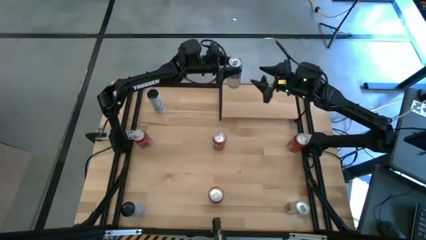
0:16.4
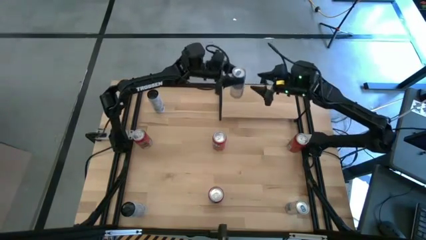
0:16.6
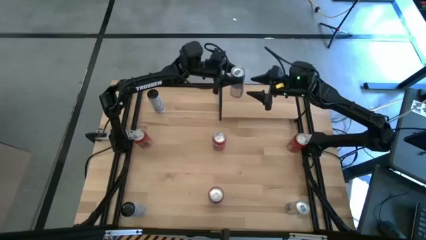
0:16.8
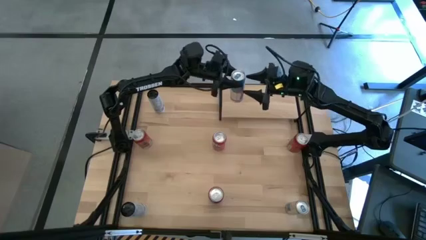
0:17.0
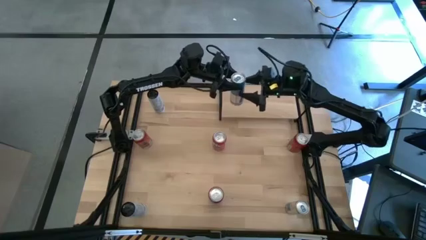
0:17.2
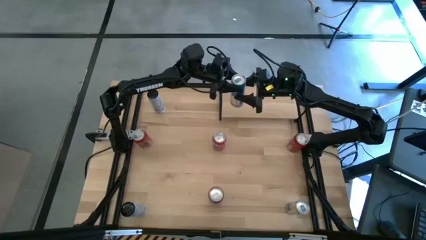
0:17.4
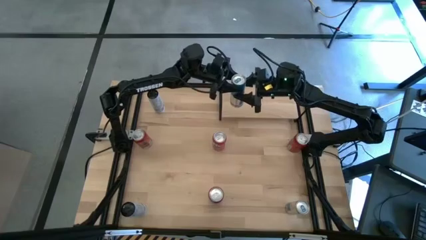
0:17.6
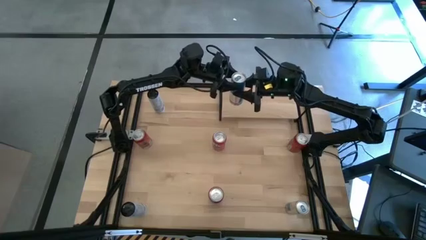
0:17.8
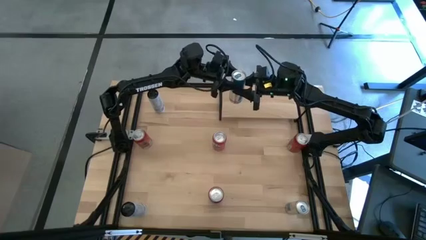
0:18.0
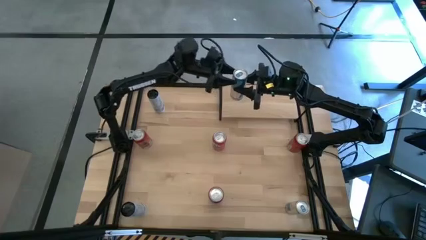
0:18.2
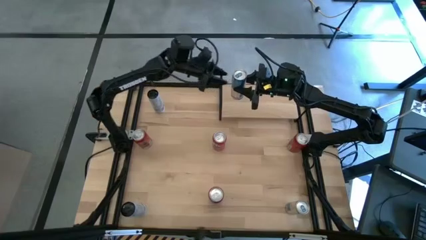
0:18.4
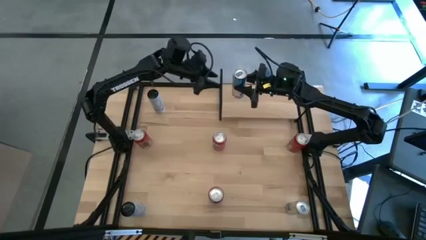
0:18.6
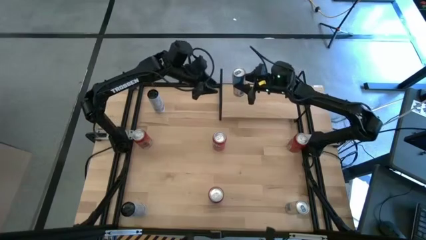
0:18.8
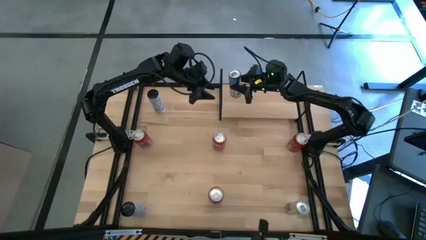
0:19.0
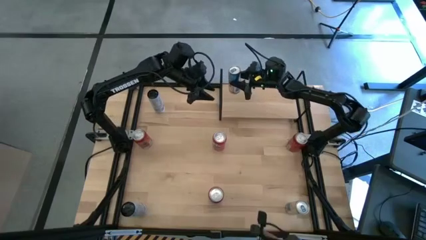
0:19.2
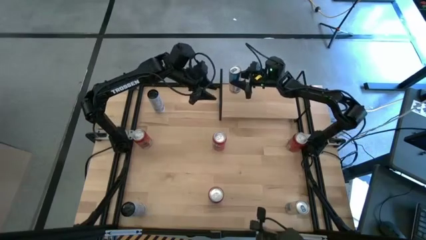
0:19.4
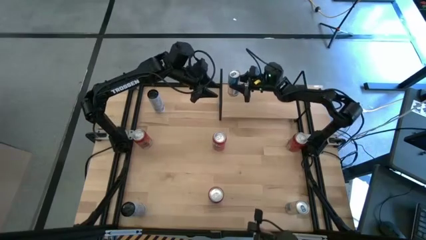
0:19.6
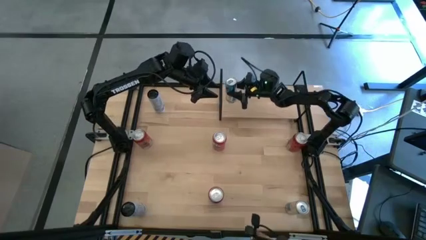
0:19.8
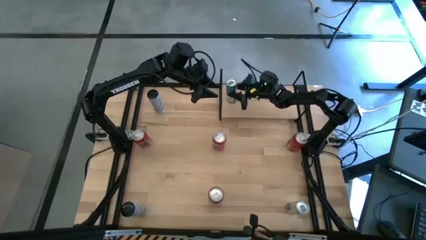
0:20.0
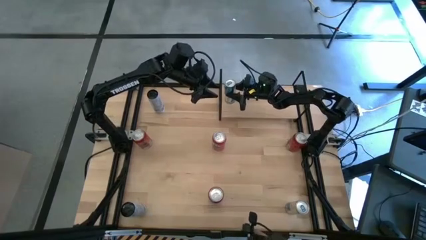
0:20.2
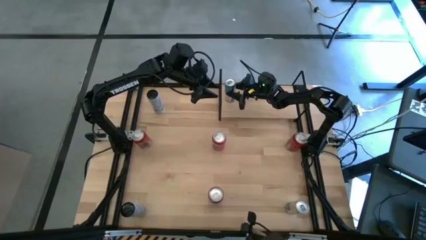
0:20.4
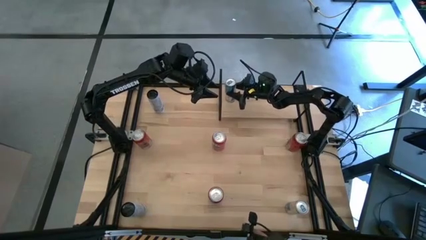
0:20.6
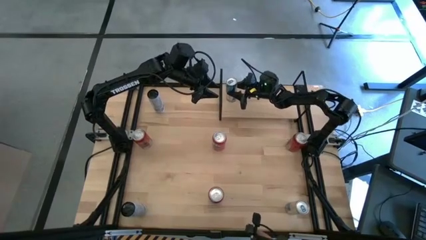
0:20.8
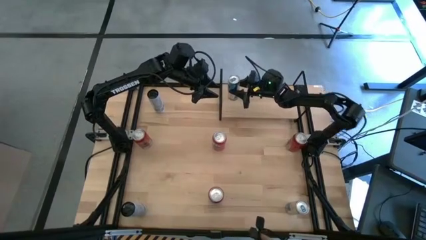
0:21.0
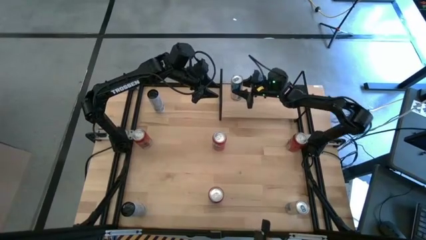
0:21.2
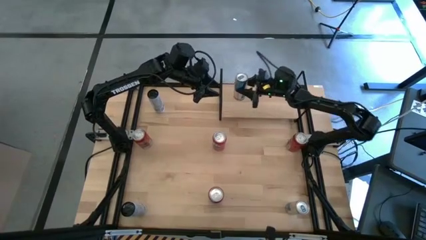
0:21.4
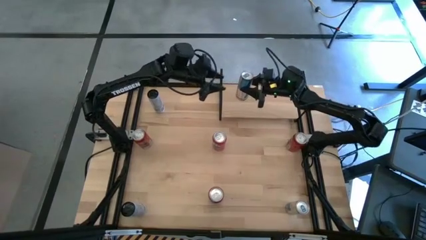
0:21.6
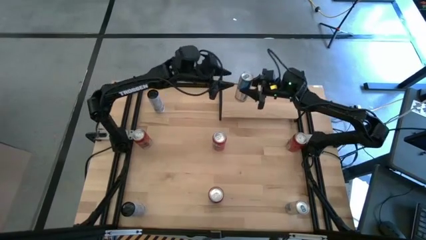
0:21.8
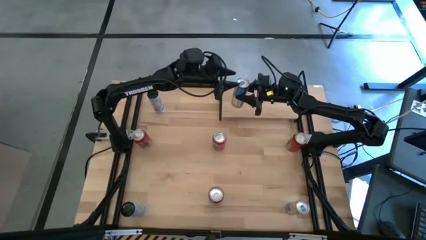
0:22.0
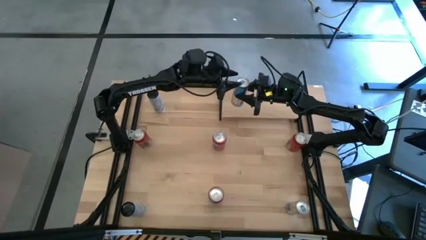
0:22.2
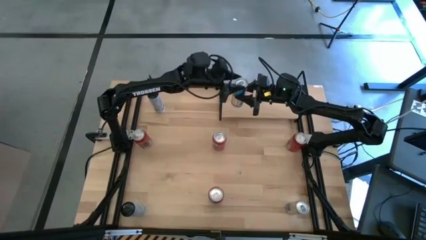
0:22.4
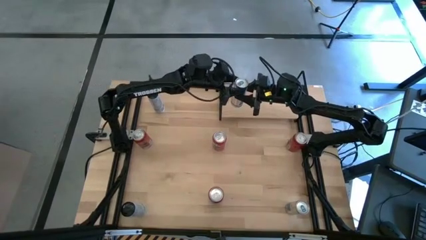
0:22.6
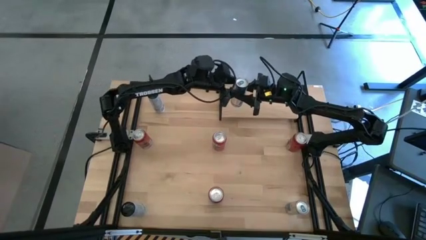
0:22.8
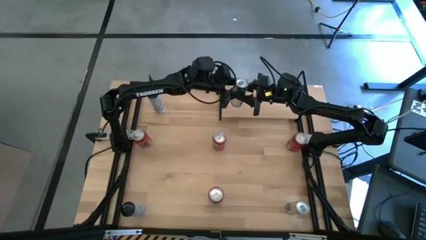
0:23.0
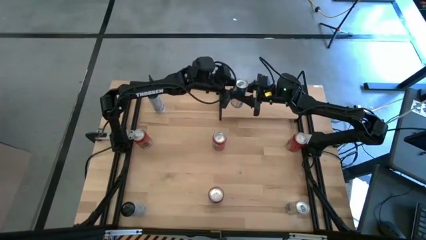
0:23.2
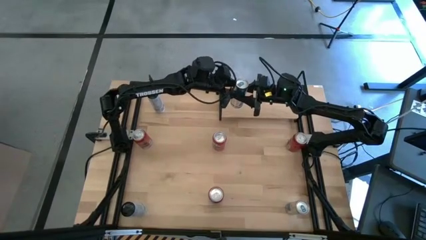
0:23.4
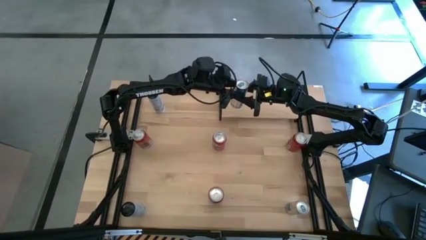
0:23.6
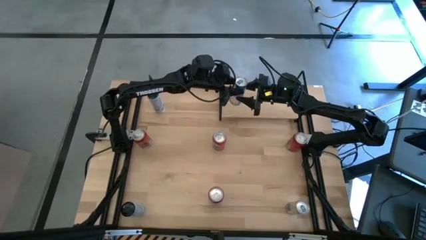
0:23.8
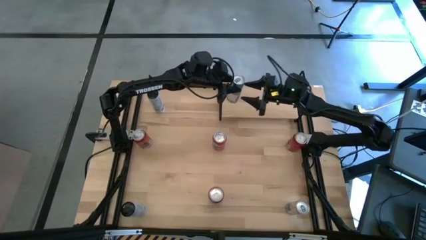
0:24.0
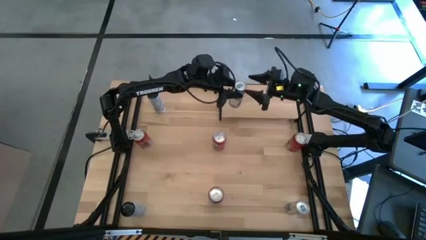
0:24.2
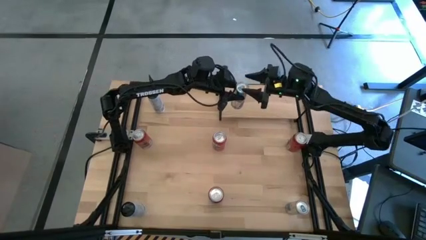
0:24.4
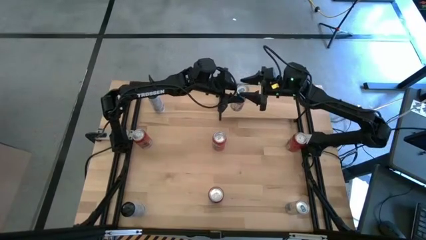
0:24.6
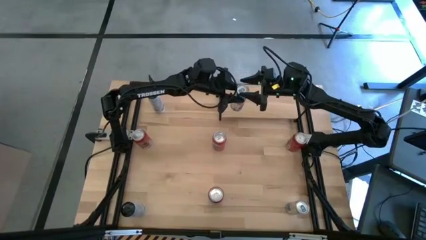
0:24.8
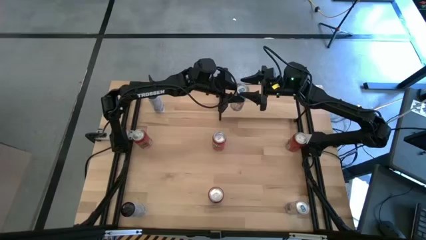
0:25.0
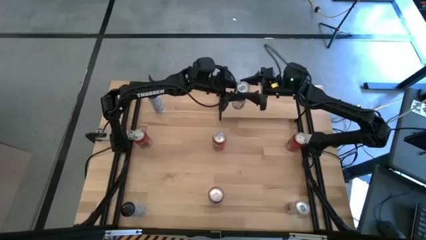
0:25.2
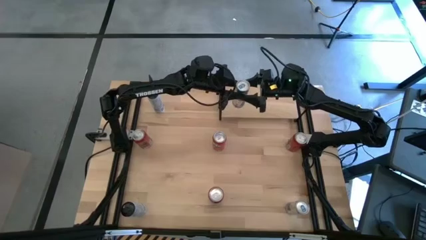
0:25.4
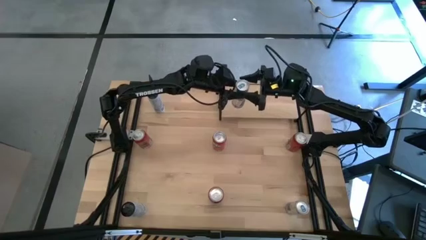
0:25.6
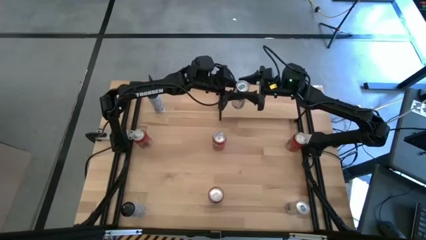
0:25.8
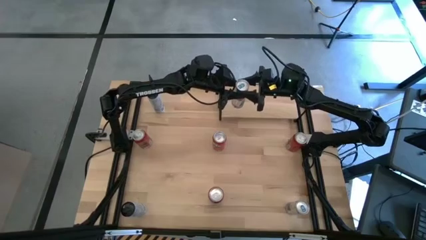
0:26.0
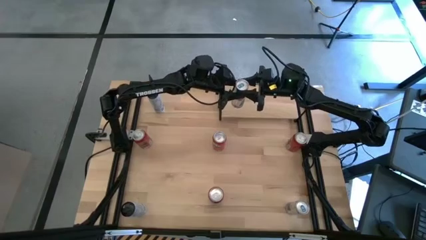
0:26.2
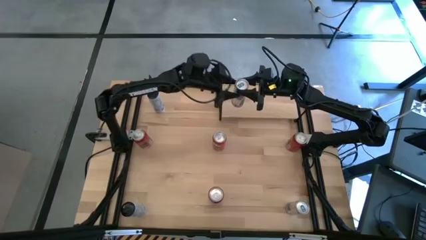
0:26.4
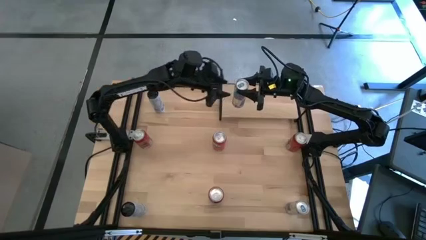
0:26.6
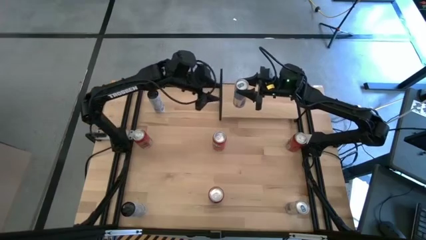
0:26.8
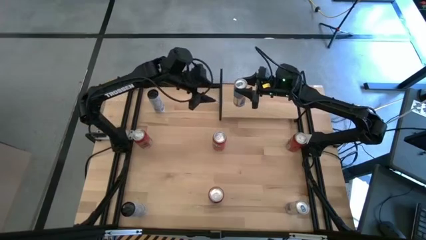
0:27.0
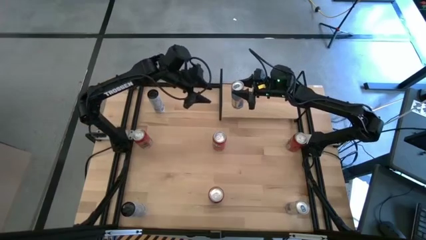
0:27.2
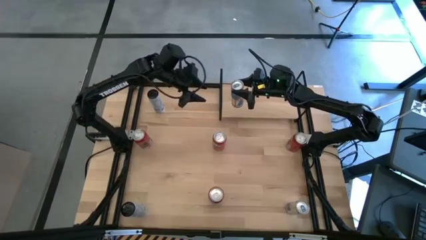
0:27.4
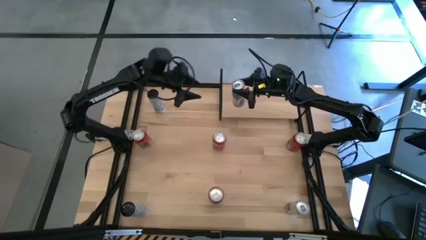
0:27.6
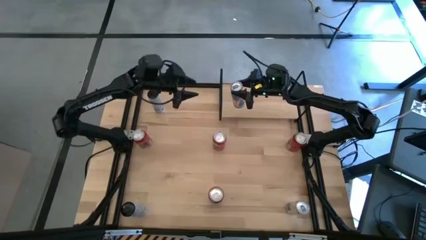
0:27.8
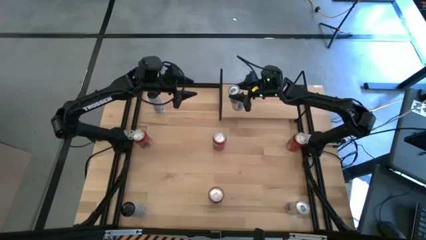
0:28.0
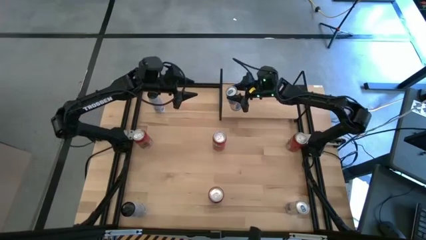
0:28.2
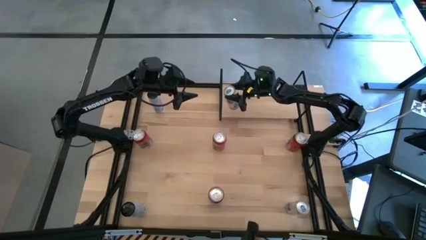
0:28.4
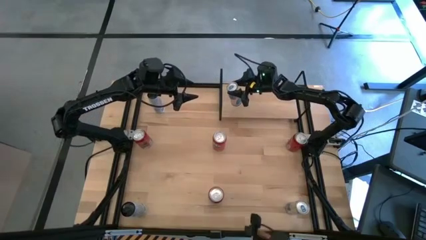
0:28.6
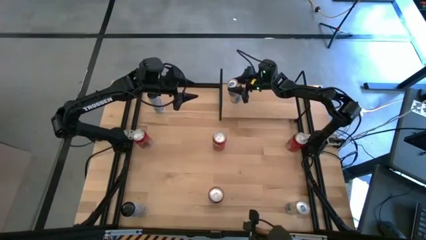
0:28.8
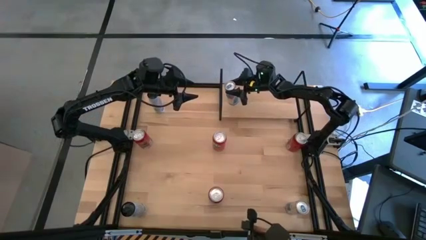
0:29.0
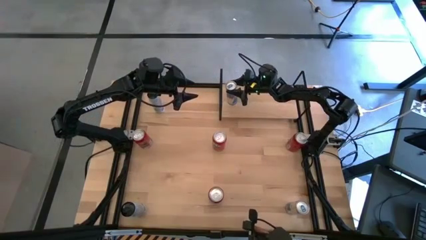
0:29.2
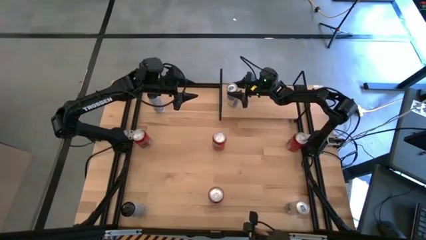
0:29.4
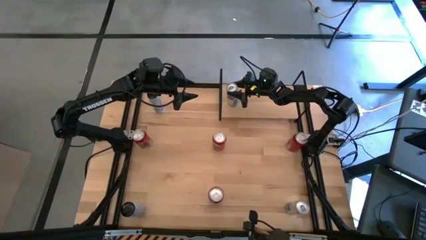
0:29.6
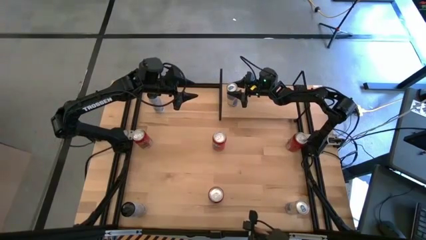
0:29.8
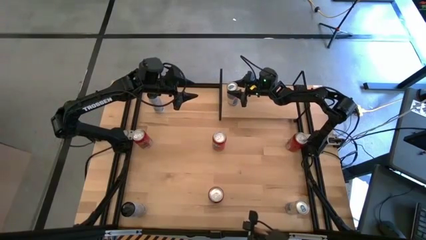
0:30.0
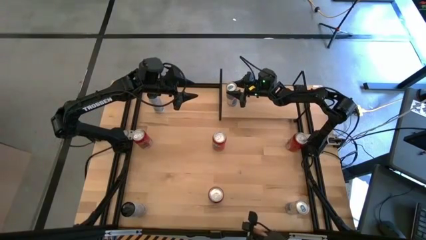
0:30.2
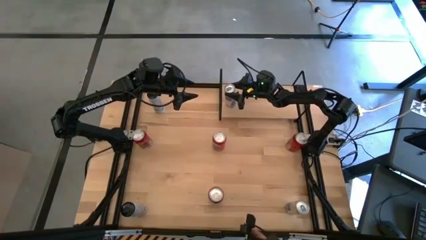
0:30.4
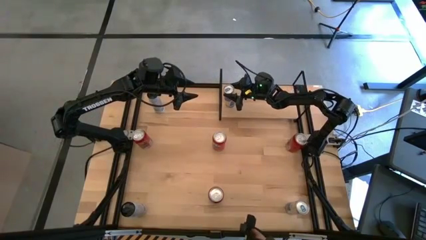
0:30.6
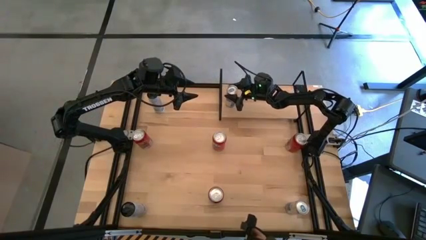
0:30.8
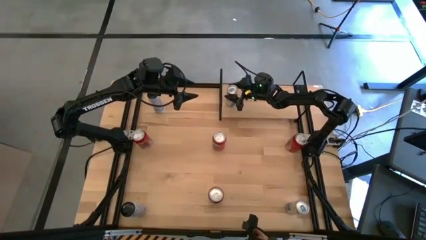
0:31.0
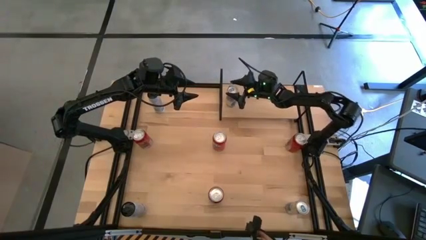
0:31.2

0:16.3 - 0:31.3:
Task: Place canned beverage on shelf
Put the top blue soda can on the shelf
